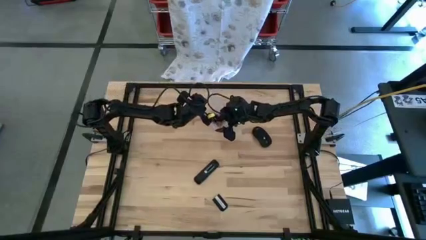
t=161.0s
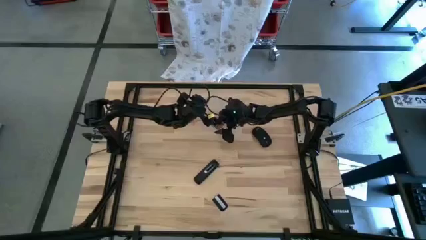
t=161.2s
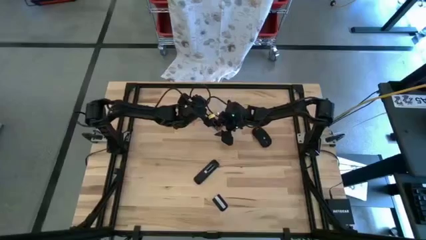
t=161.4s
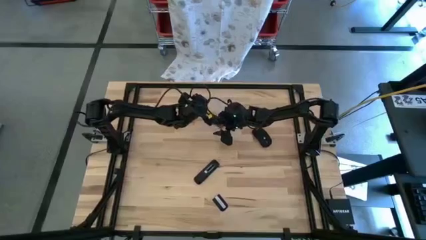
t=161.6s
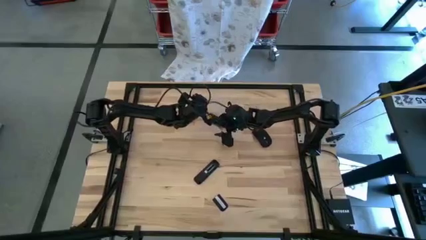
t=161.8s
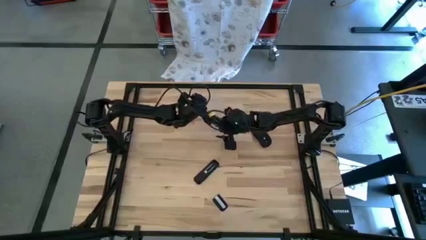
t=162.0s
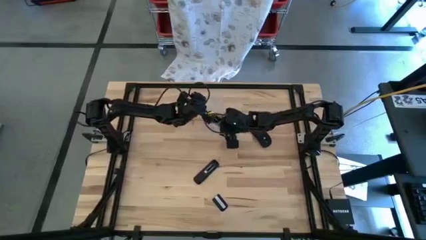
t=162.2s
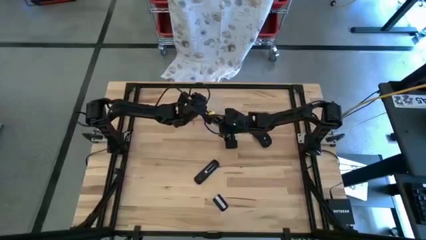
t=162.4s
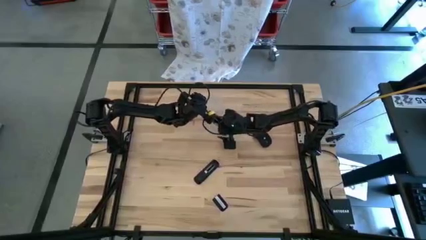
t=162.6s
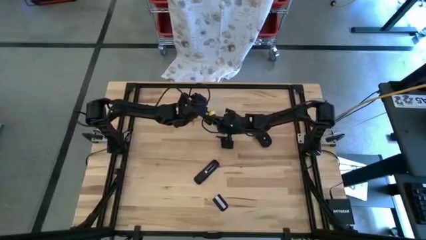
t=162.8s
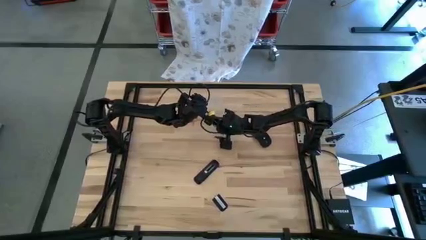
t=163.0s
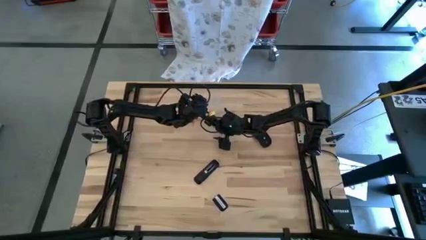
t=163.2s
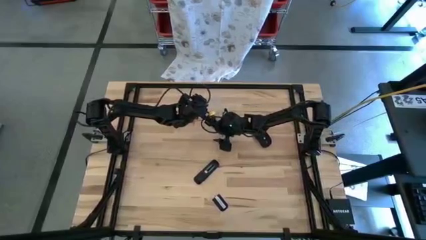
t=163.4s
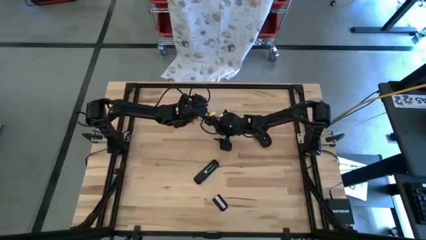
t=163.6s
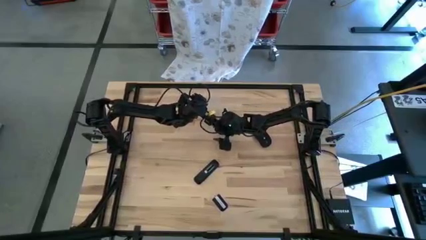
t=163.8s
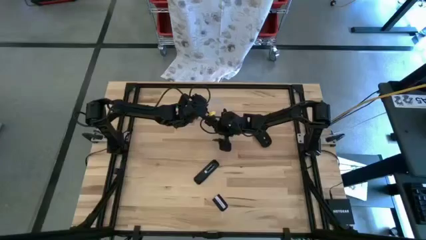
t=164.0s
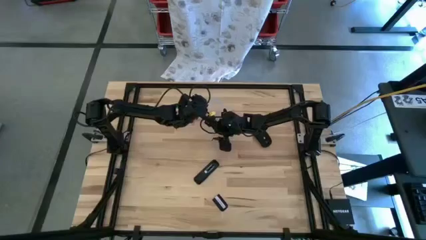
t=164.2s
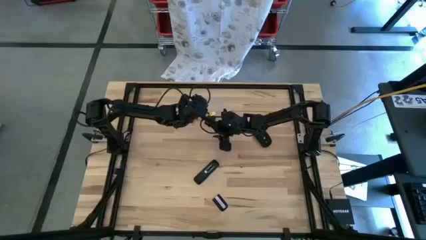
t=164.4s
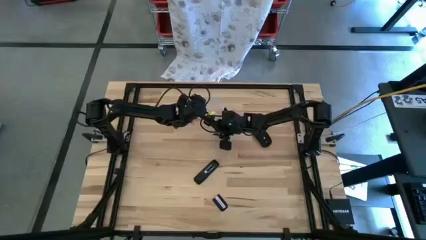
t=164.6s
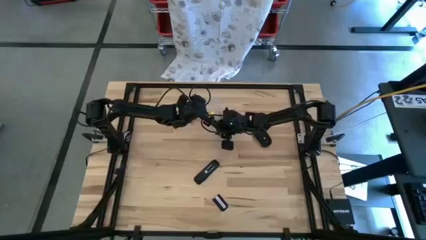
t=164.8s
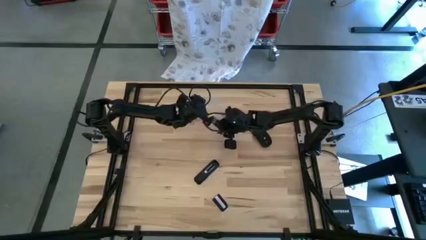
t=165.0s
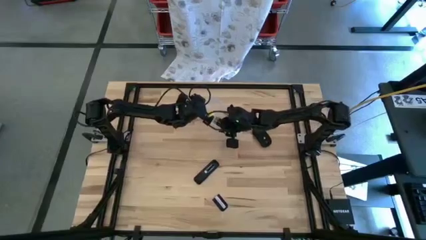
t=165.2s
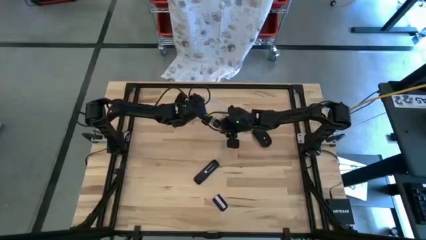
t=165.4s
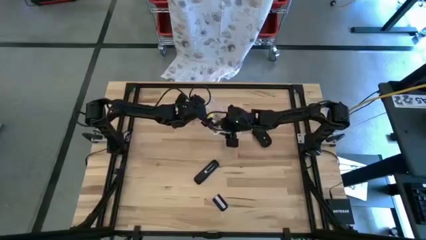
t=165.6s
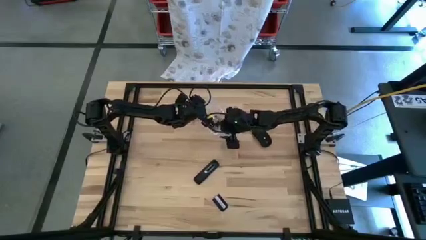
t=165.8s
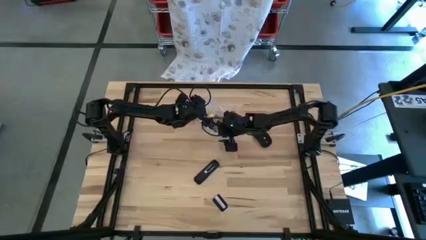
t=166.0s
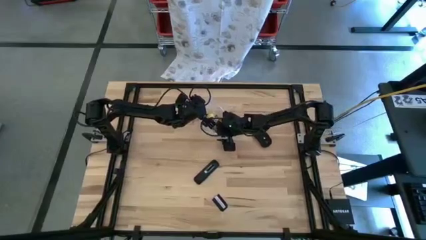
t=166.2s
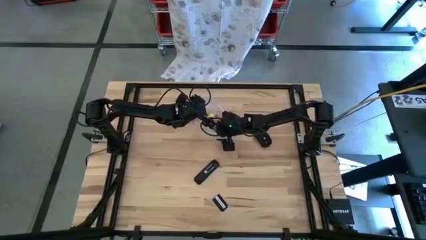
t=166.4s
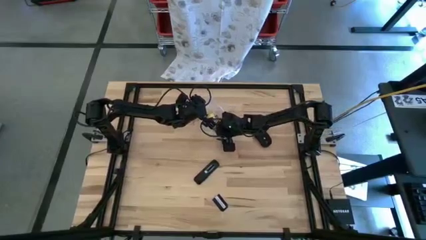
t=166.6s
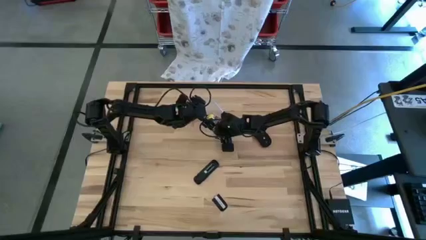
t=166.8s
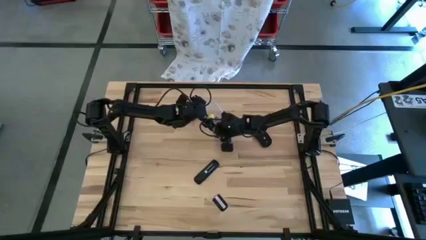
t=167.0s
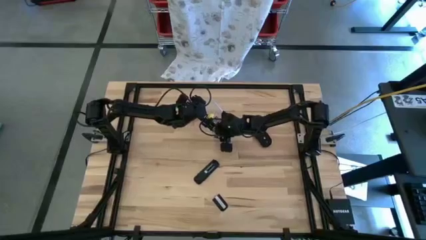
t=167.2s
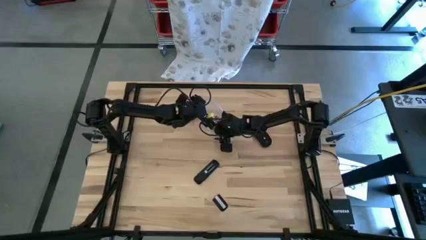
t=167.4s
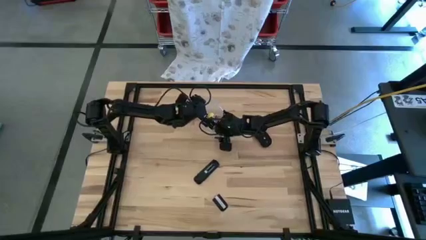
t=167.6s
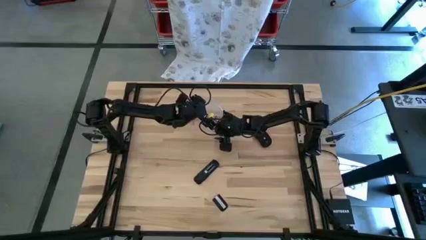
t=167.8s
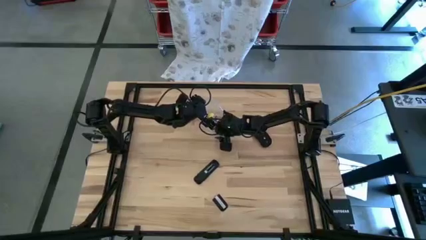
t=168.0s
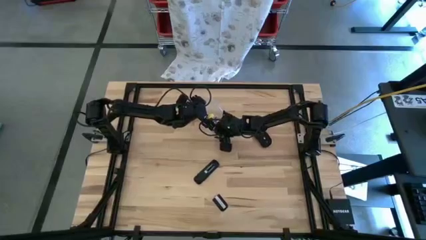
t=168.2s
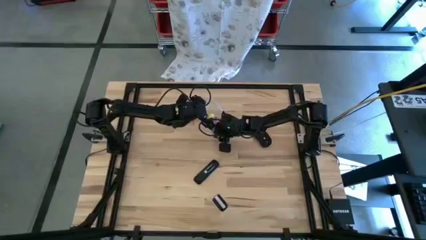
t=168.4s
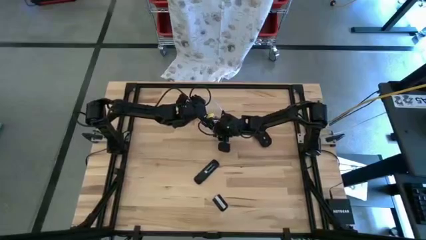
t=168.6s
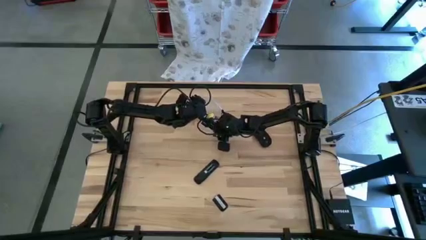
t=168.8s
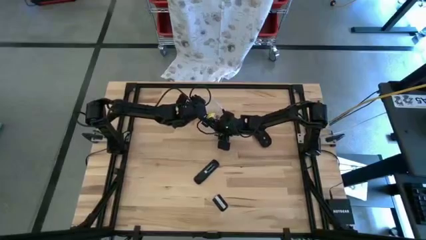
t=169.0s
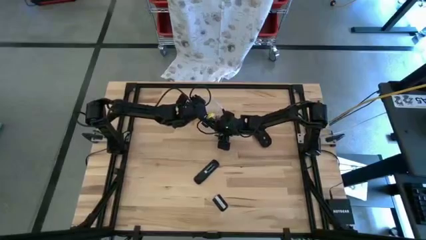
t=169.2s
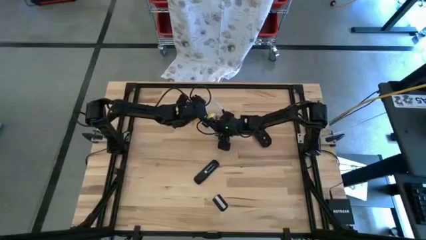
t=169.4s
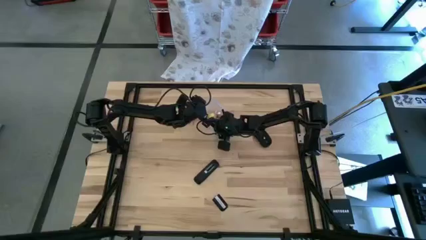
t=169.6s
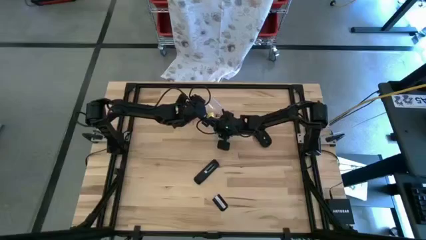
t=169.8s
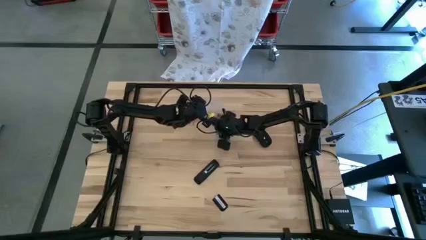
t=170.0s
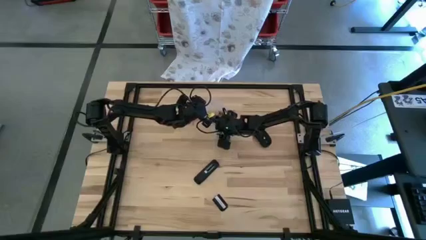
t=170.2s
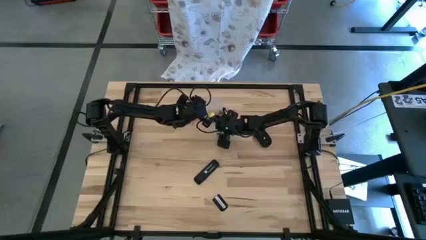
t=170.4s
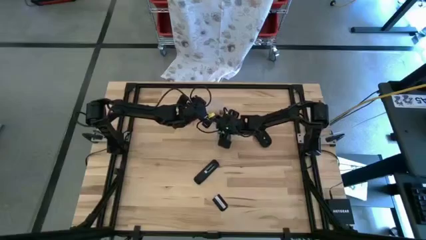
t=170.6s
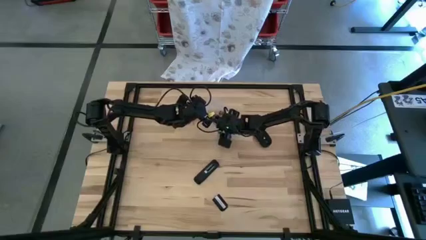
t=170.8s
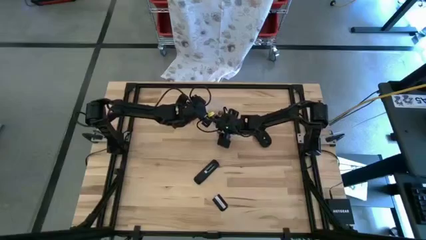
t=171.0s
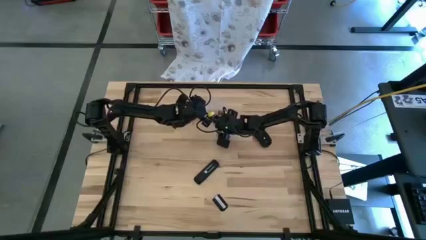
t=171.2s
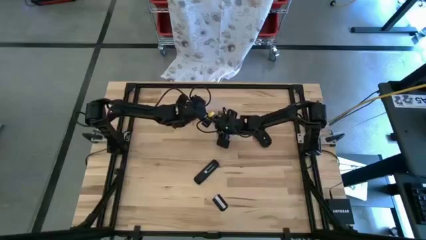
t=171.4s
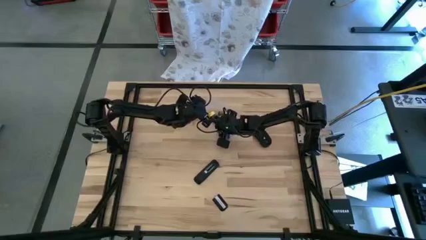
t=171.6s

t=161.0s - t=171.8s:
Task: Insert battery
Remove the silver battery from the transparent bin

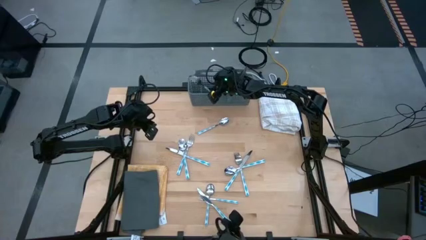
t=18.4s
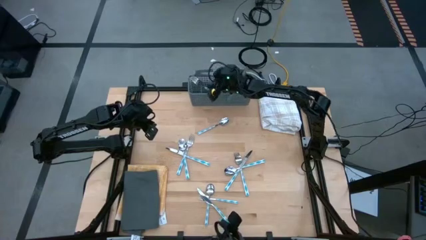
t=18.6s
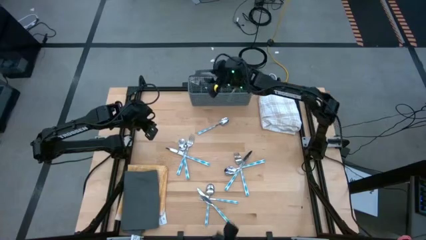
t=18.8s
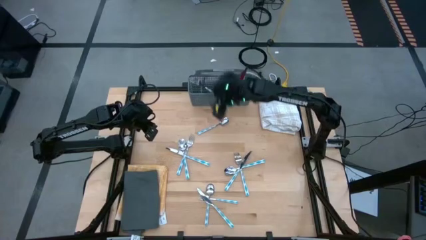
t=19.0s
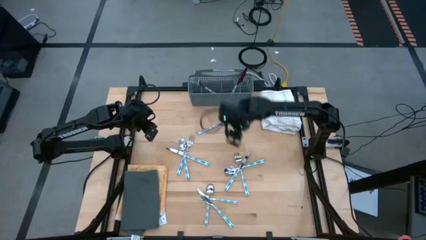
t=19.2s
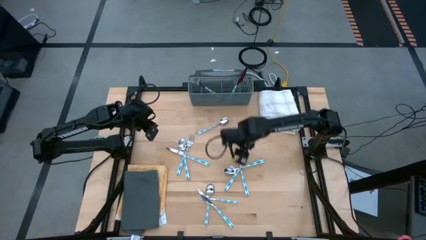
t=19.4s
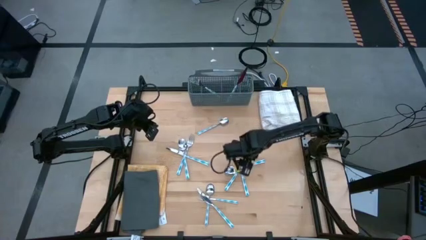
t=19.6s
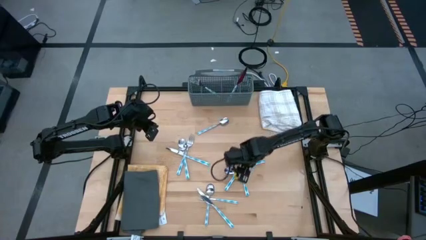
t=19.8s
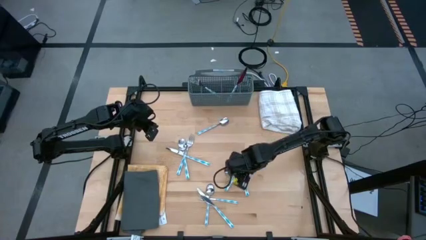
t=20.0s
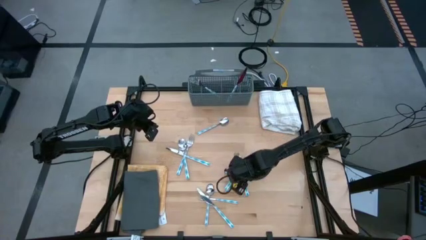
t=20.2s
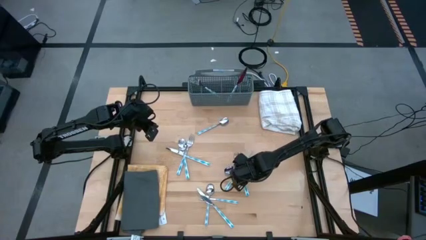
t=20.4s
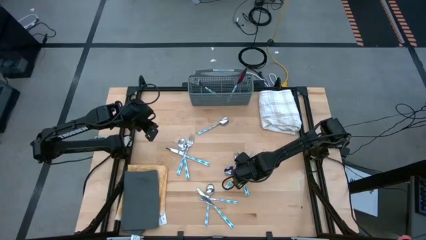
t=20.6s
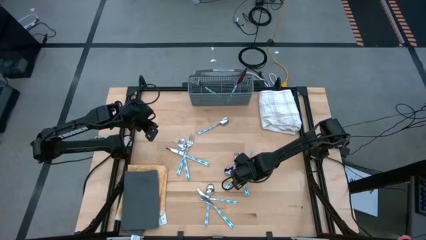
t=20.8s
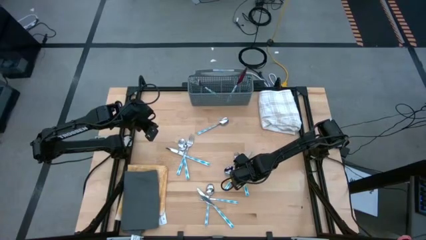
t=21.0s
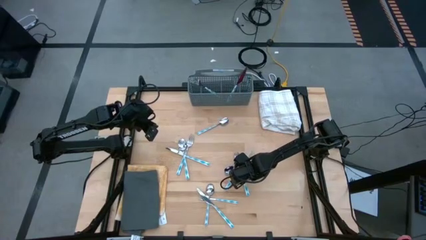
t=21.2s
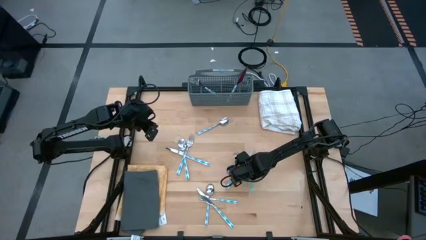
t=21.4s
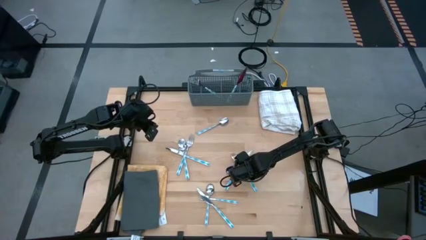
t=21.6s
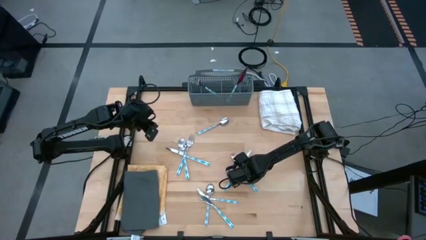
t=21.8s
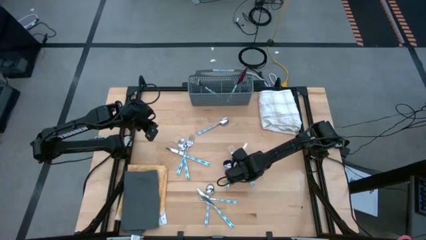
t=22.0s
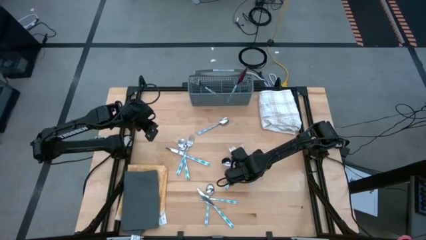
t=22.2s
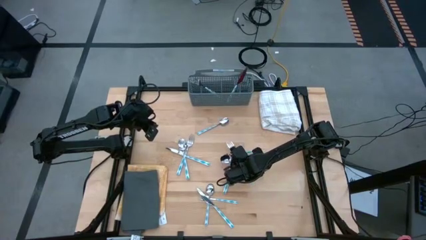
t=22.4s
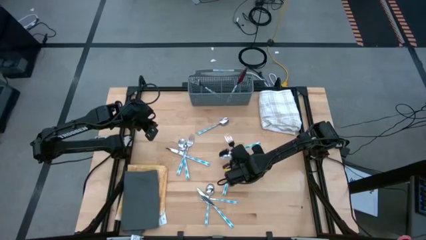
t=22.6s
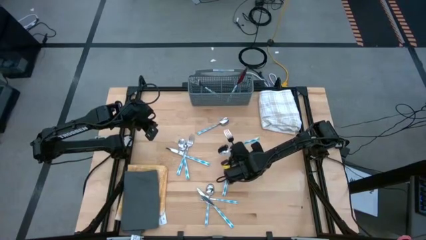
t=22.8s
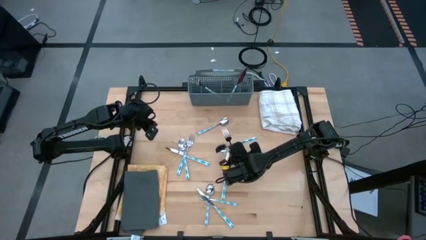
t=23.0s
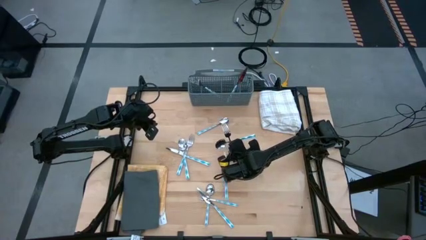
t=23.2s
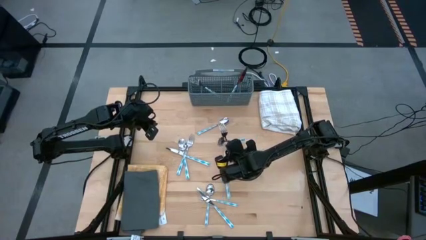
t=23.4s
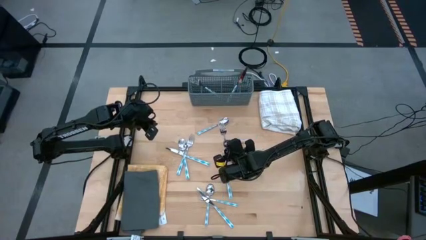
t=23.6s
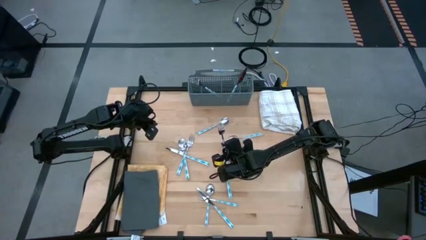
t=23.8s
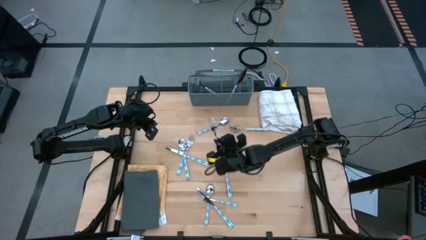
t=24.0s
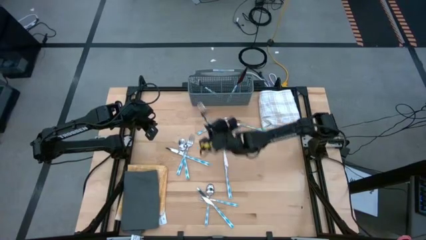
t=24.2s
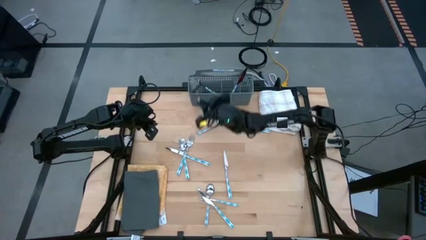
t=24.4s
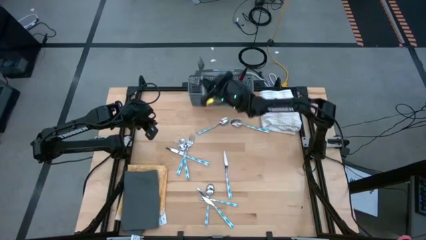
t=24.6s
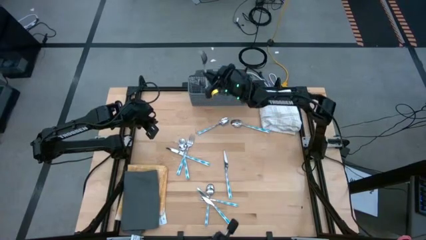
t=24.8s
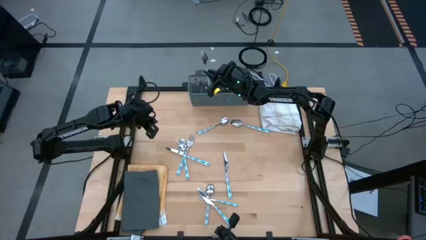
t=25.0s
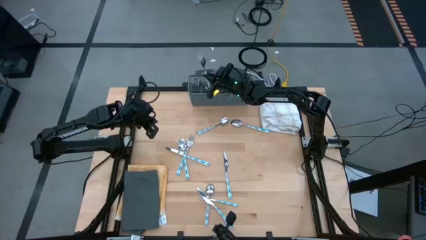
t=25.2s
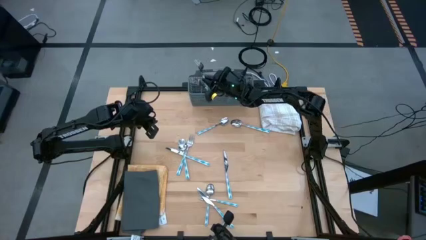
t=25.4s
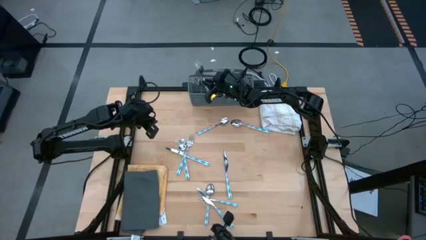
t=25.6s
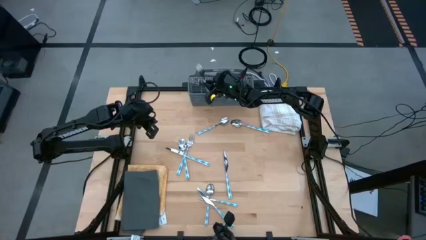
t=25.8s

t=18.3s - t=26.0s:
Task: Sort silverware
Put the top right blue fork into the gray silverware rack
